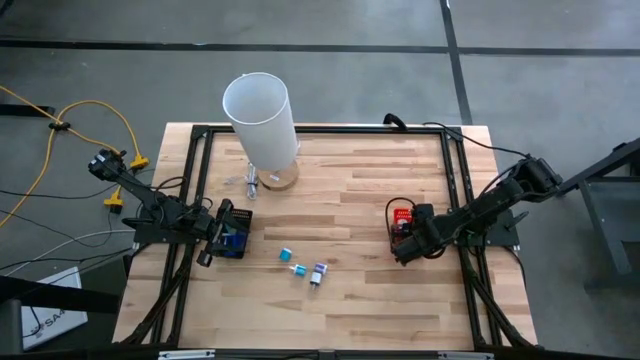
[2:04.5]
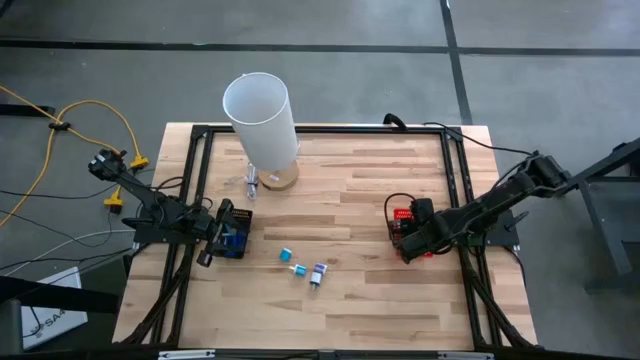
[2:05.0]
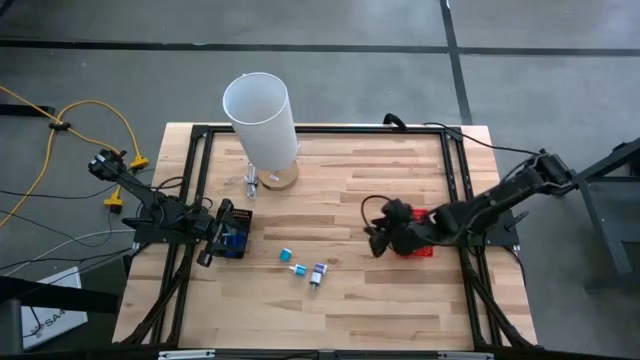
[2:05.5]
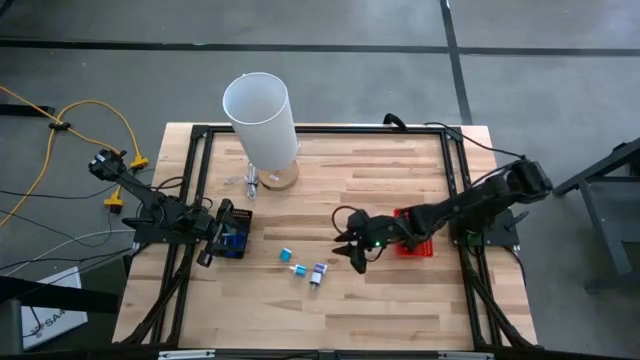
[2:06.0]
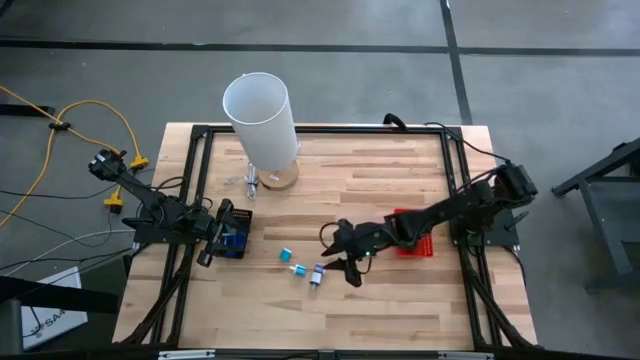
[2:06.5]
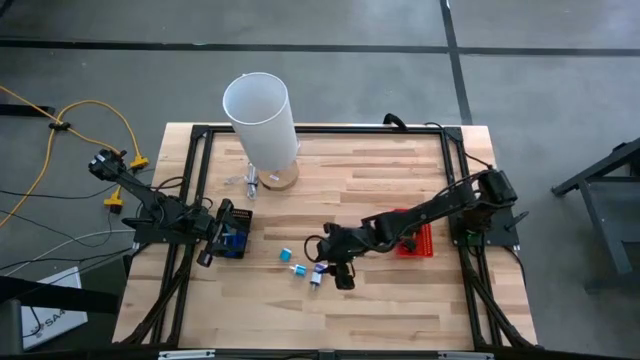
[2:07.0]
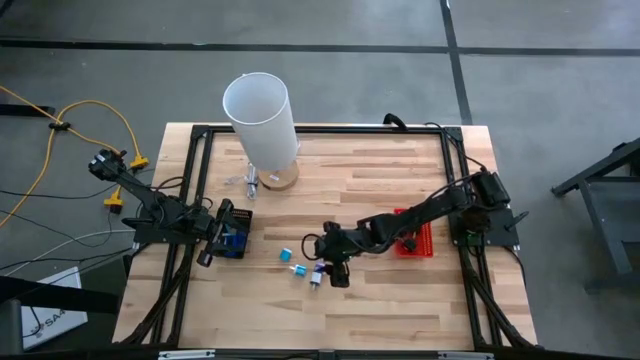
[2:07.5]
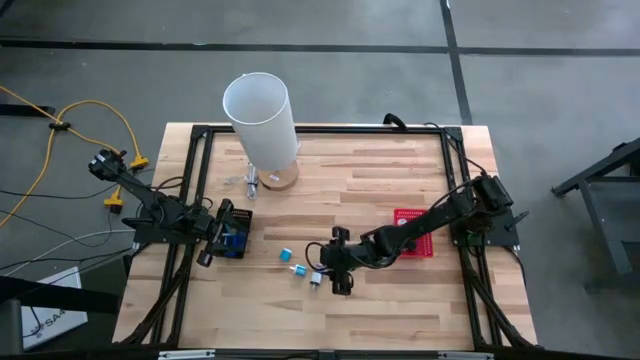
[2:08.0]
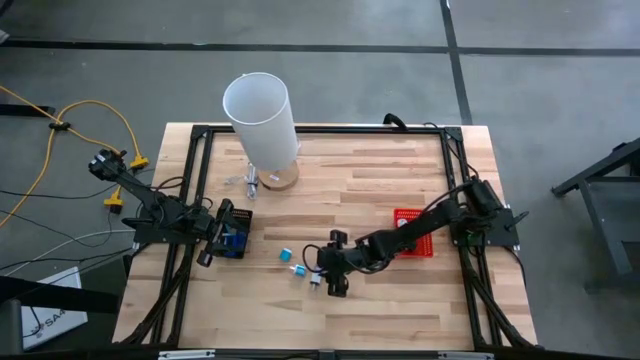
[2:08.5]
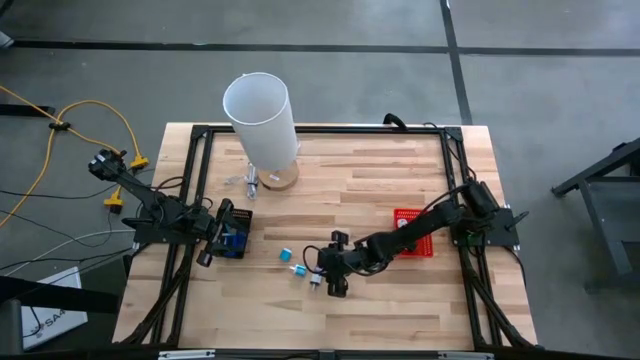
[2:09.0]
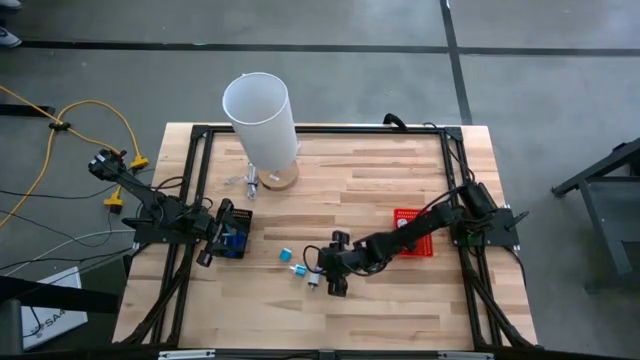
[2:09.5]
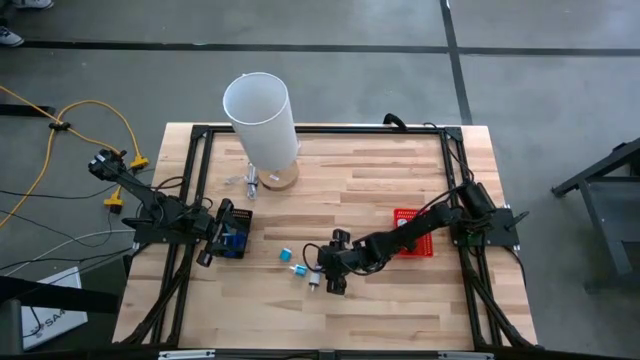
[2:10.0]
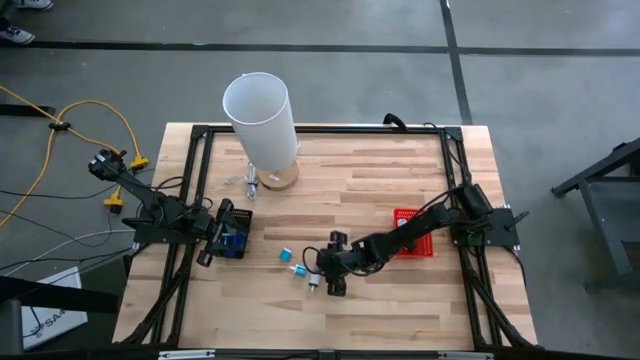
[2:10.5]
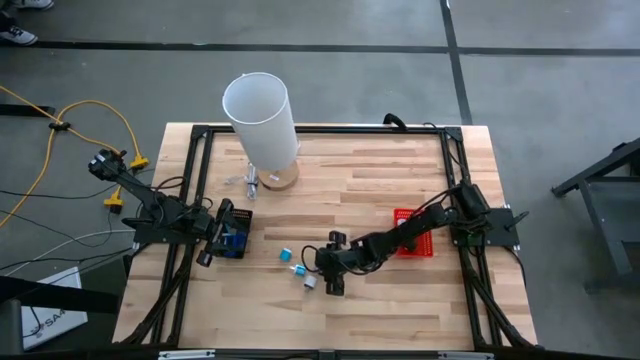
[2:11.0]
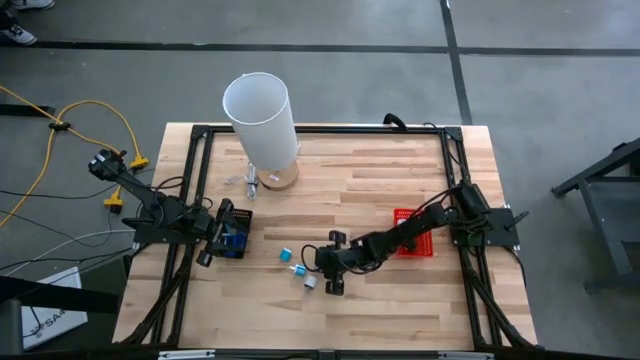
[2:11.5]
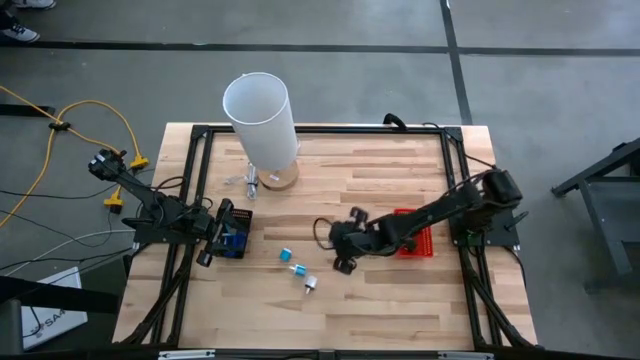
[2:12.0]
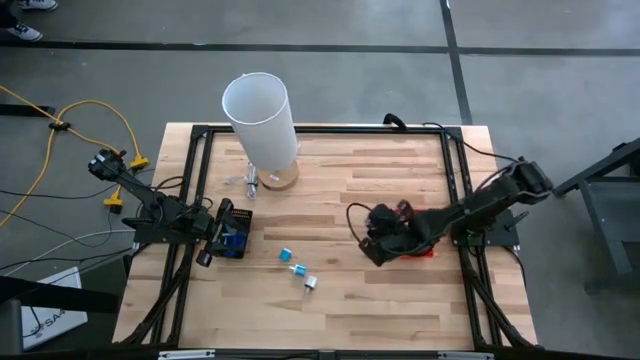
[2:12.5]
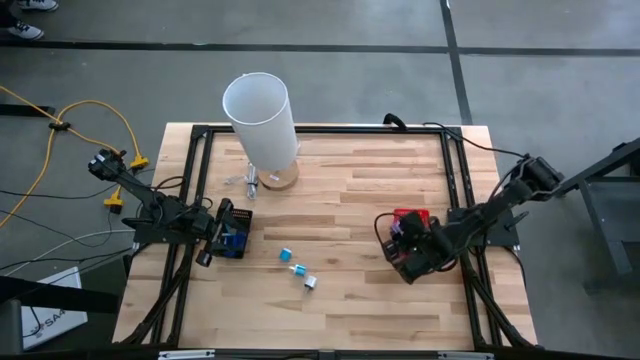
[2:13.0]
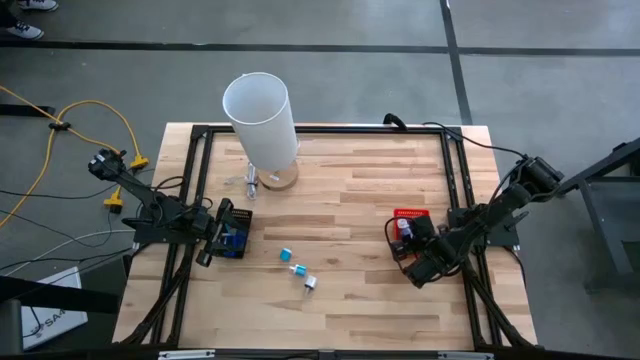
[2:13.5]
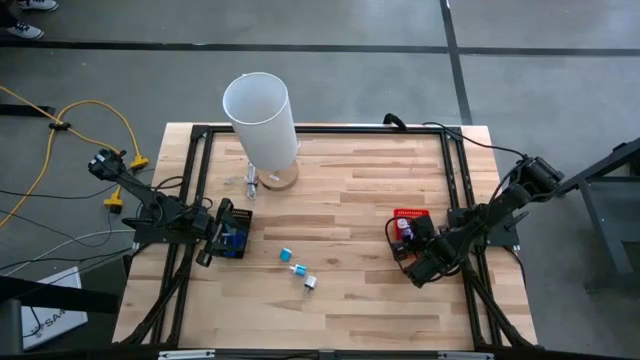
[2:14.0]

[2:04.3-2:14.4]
Task: Pick & Place Office items
Put the violet charger adapter into the red bin

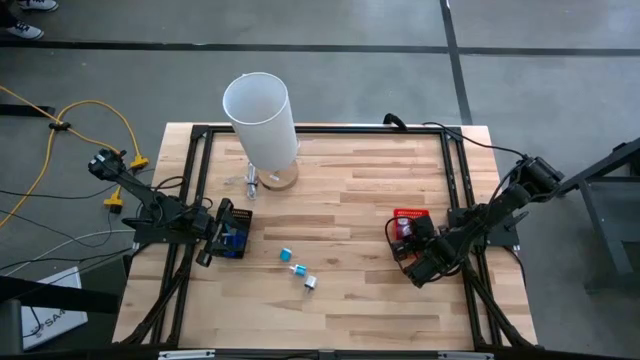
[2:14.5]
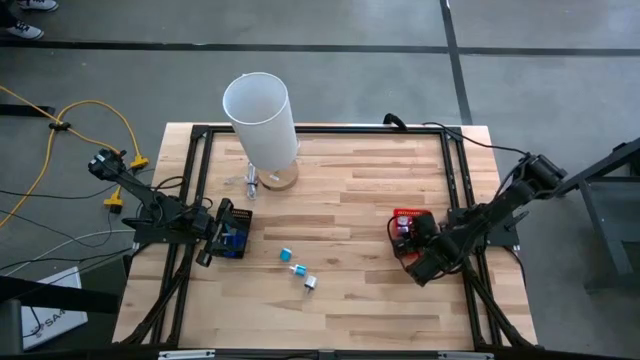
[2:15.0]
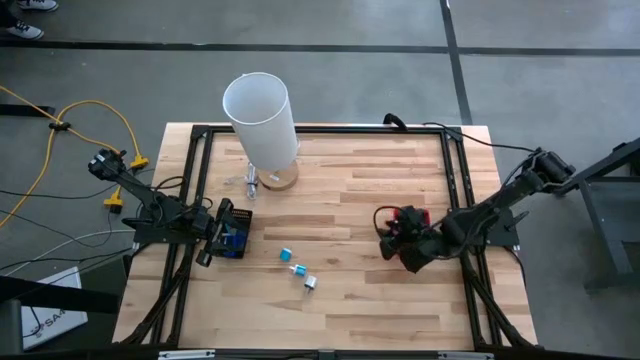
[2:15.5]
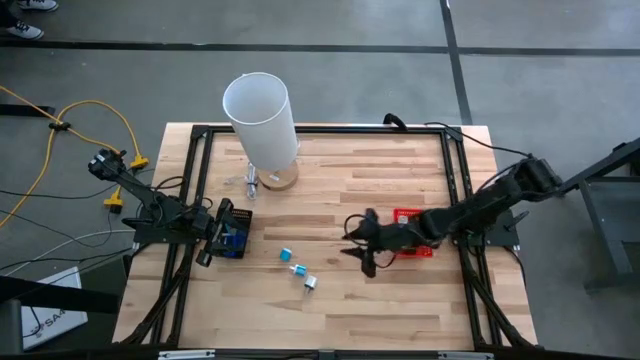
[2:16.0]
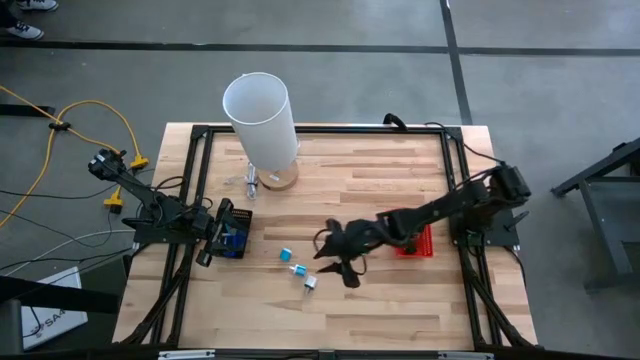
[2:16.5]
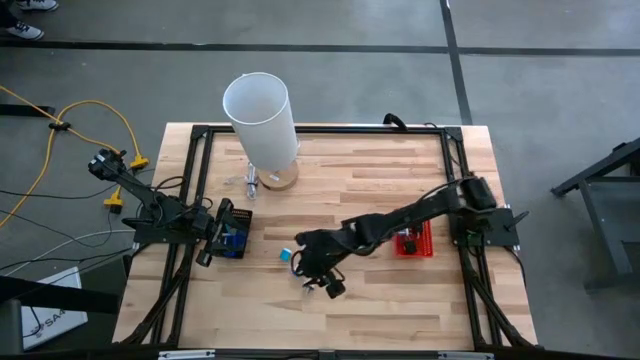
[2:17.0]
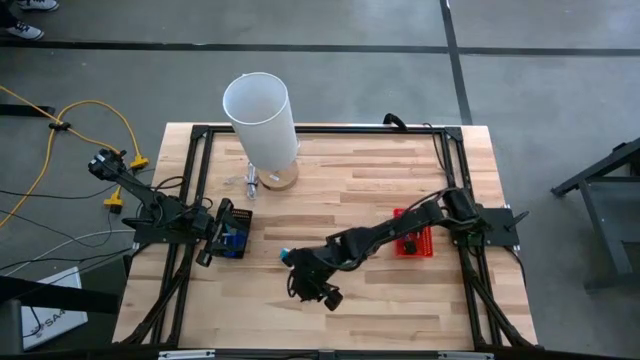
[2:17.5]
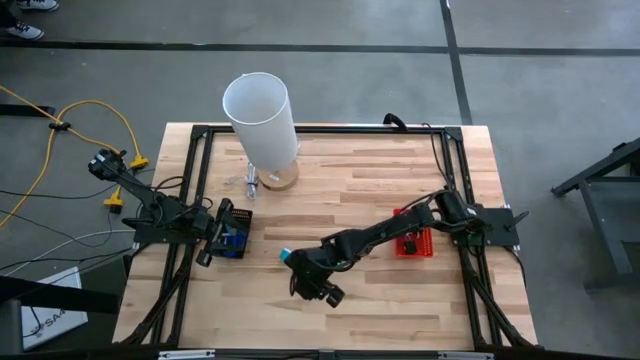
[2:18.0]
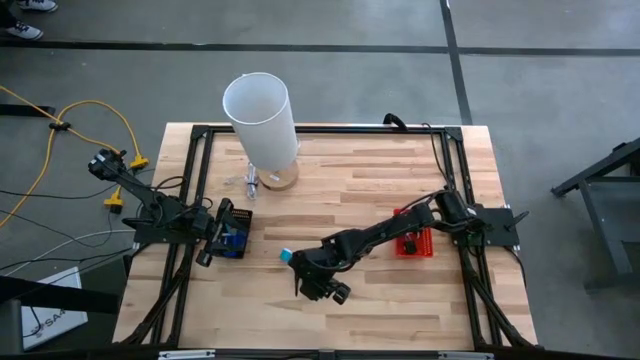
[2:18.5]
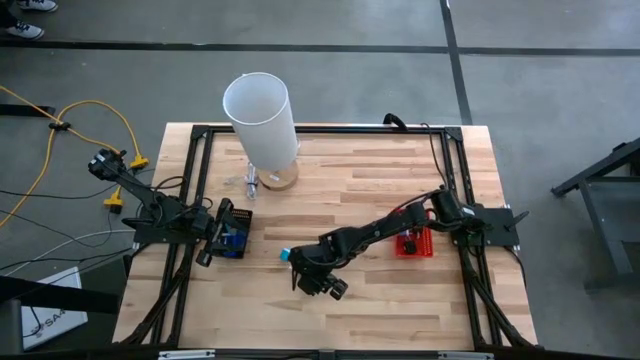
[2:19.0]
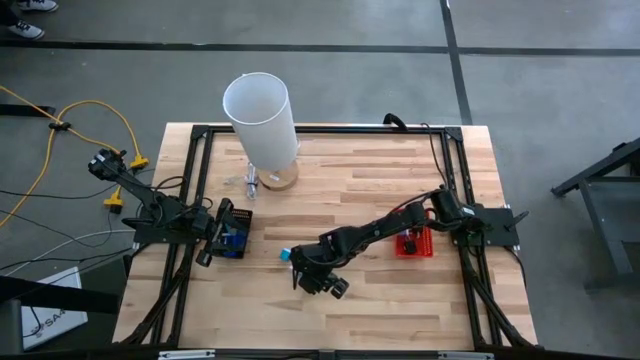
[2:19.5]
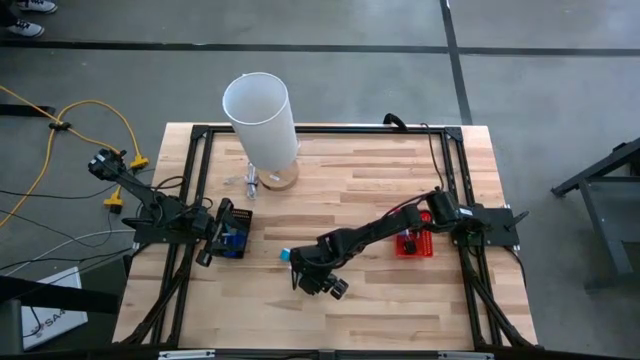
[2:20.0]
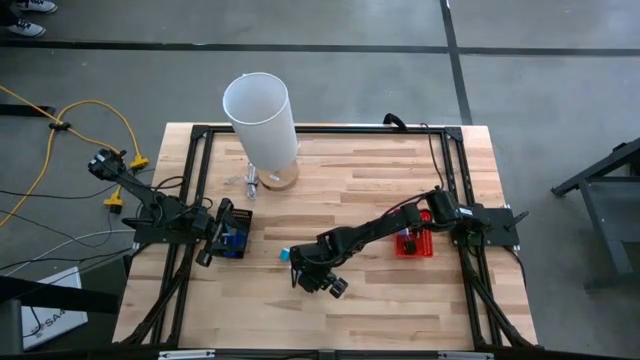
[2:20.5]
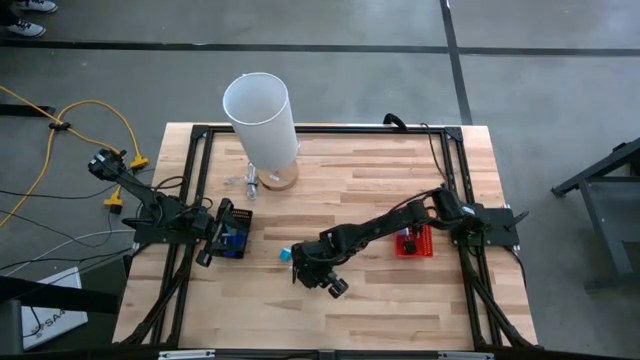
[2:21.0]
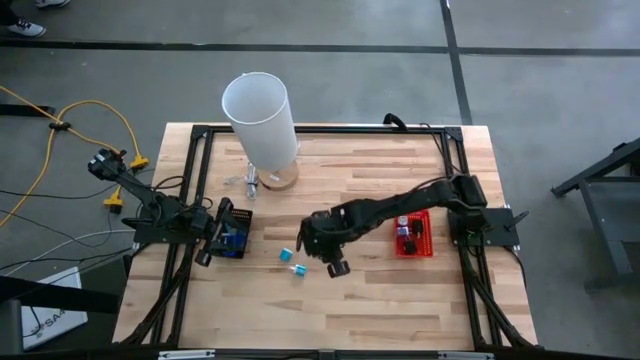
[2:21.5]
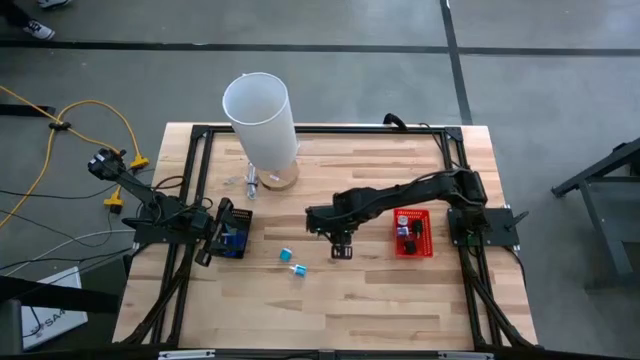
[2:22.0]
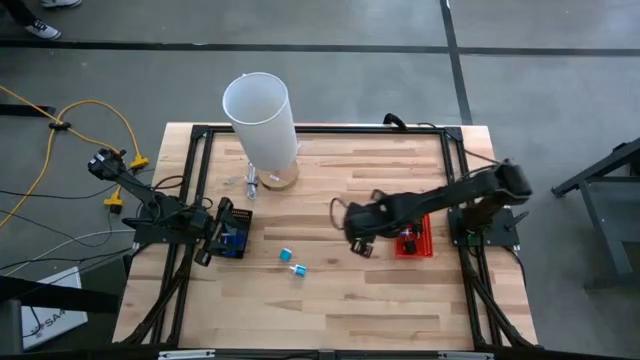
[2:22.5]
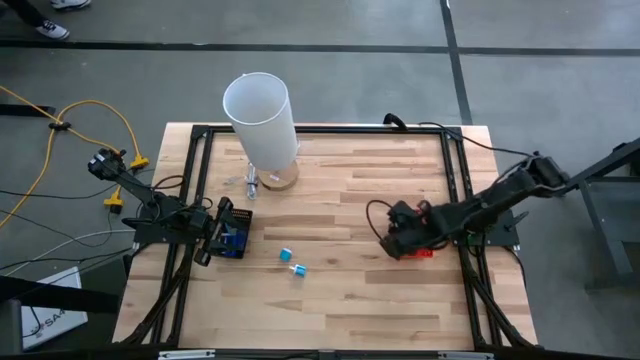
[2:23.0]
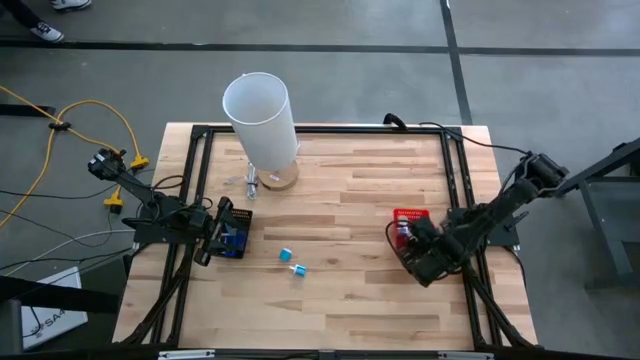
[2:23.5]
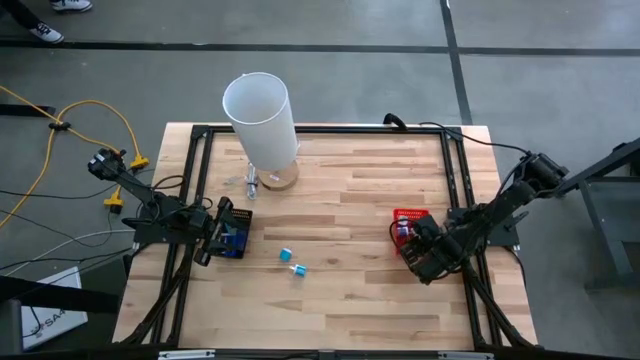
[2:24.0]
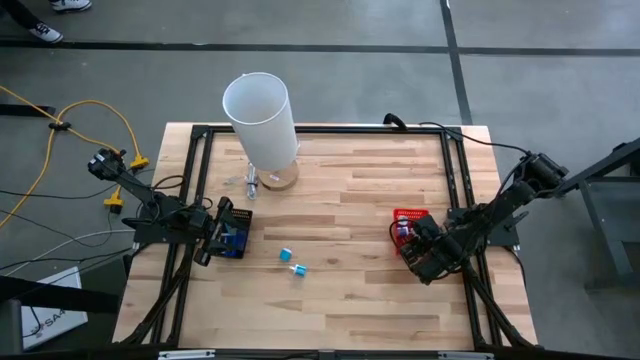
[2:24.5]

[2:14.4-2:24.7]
Put the white charger adapter into the red bin
